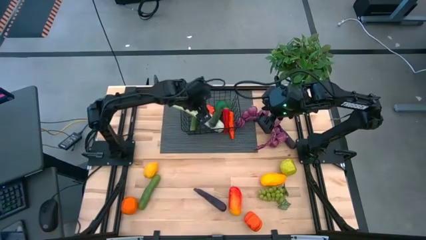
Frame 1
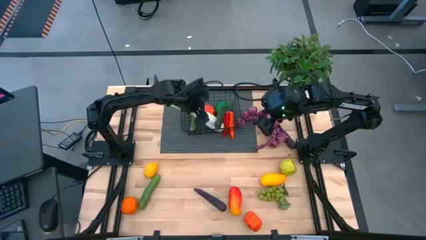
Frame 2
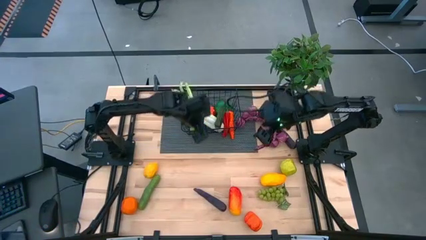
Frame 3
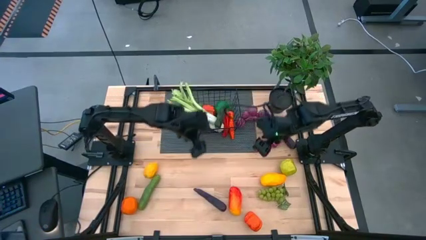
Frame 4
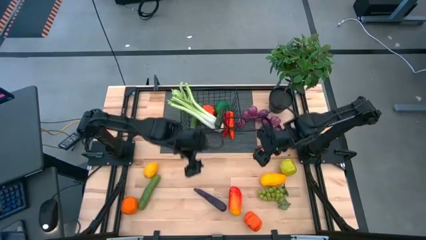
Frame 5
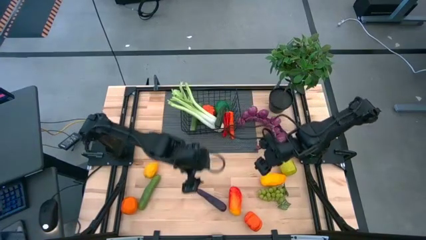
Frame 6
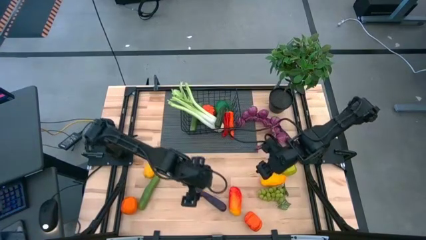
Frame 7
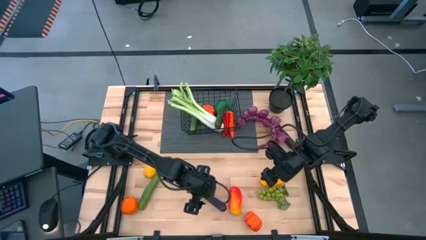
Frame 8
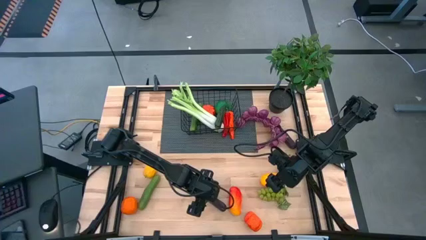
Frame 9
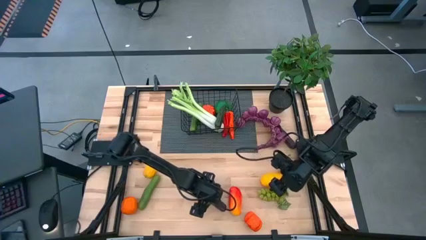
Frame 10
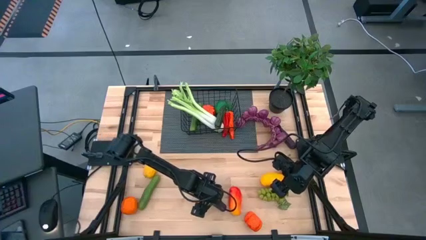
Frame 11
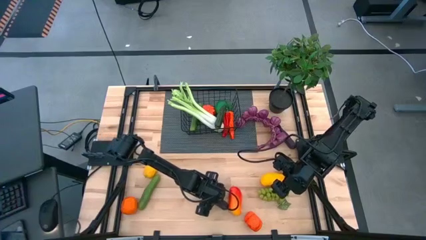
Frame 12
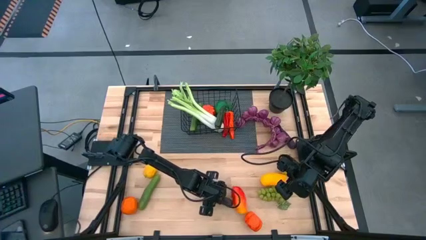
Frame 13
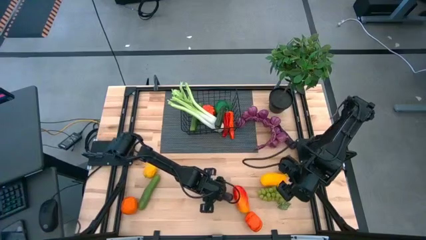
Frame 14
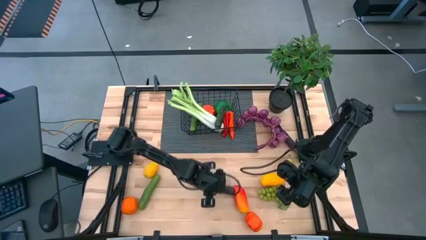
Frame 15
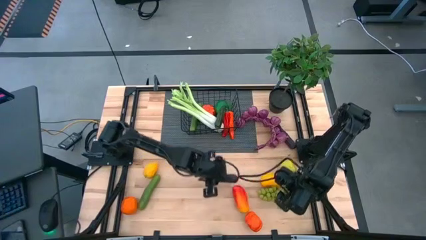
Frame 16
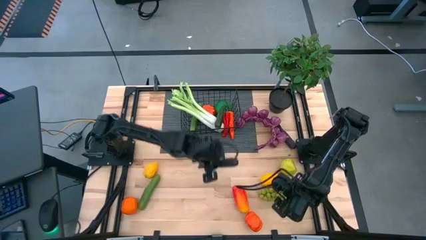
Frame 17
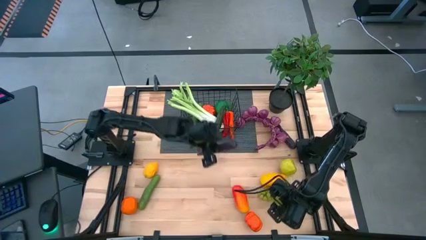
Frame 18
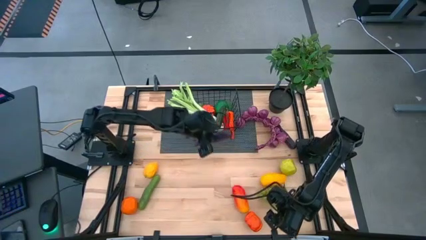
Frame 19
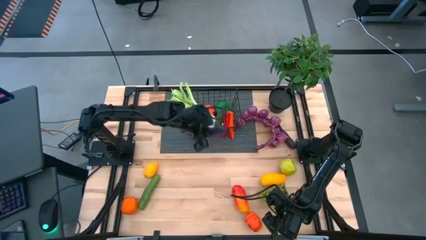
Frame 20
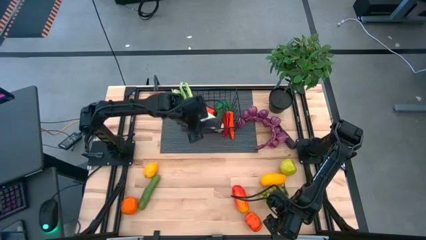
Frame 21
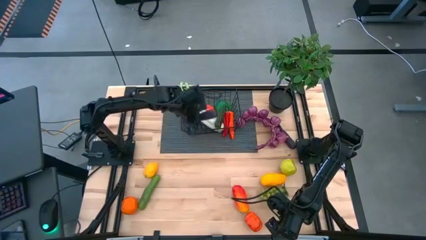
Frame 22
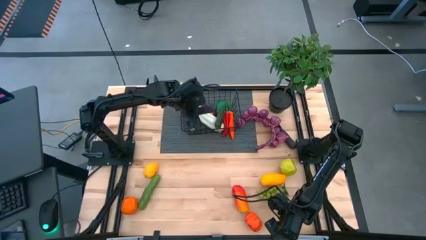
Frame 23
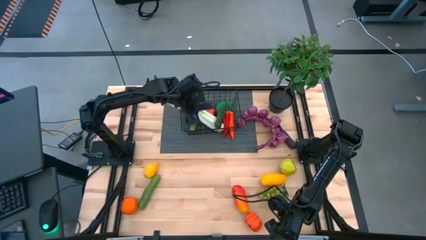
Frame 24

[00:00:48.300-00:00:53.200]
Task: Build produce basket
Put the eggplant into the wire basket

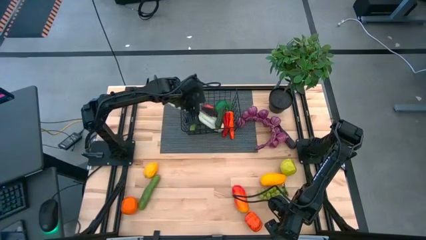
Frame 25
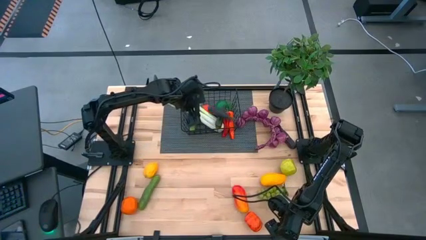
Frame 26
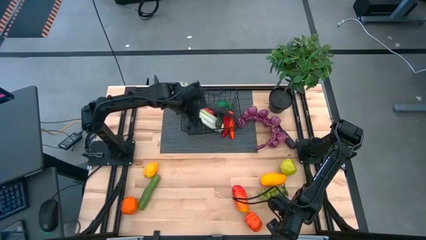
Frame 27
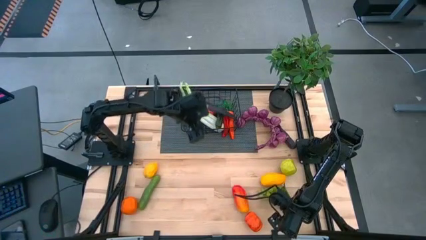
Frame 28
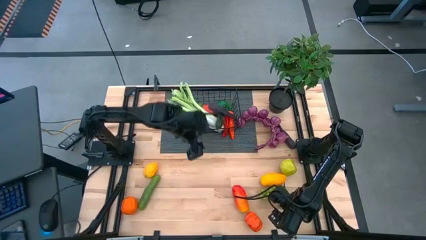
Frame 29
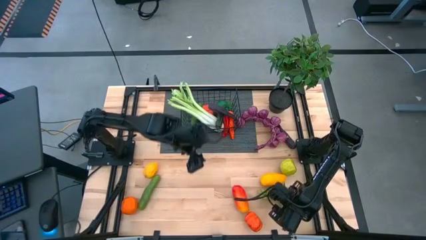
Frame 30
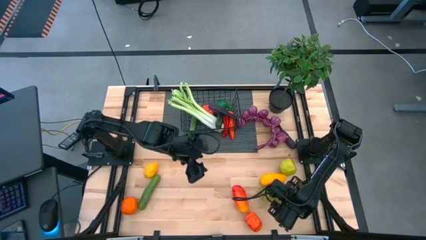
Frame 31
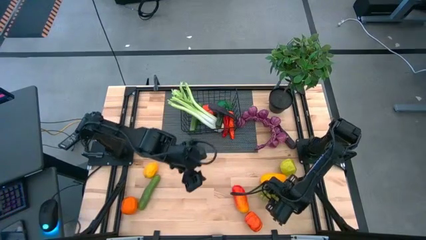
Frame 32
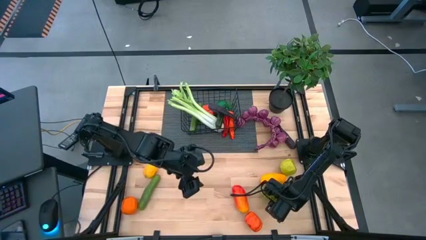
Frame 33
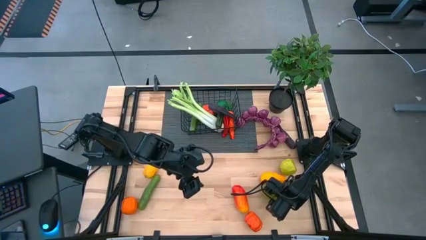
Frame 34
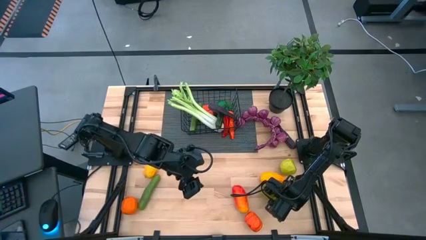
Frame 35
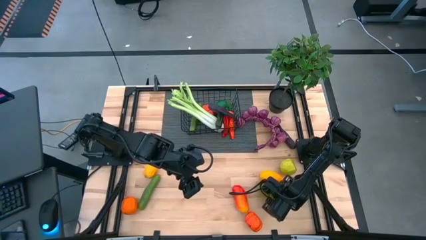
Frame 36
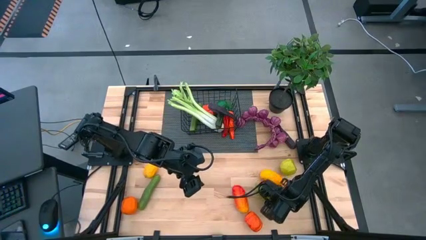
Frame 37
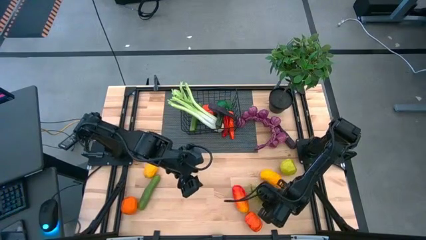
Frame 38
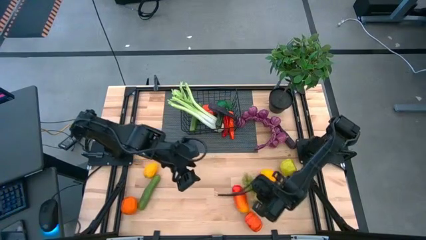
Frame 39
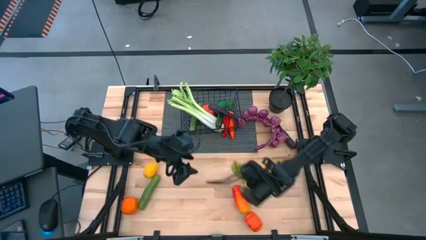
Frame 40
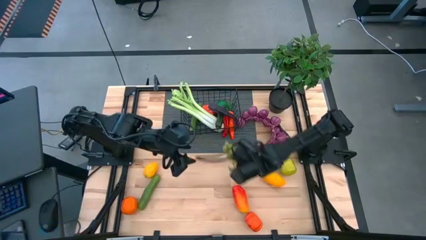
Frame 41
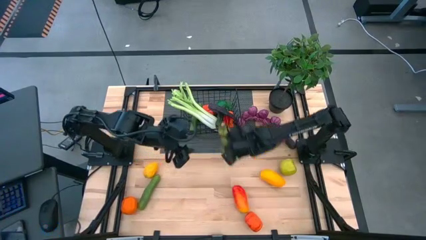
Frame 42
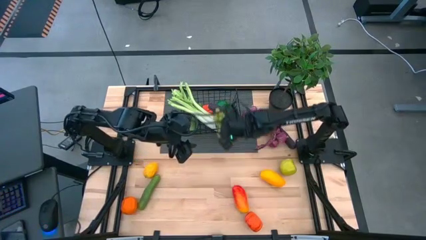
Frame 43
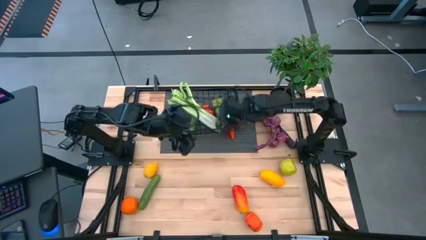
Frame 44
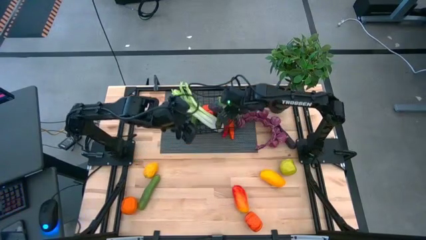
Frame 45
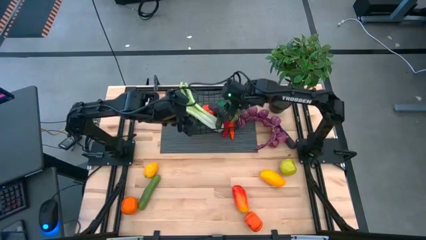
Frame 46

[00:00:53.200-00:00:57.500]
Put the grapes into the wire basket

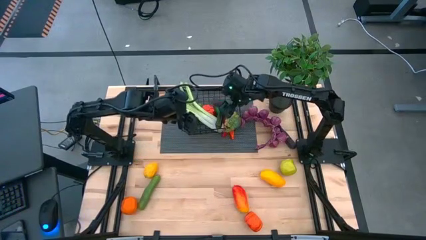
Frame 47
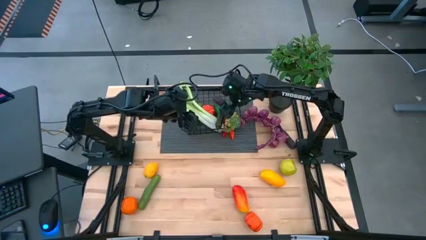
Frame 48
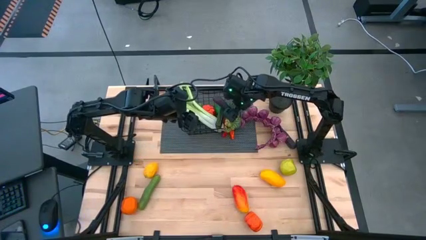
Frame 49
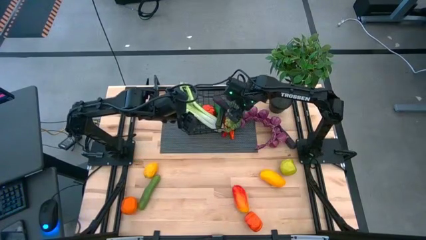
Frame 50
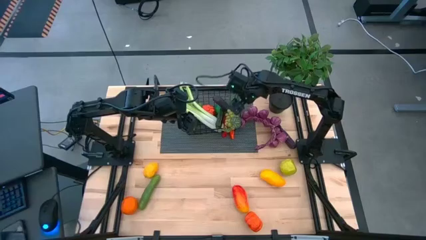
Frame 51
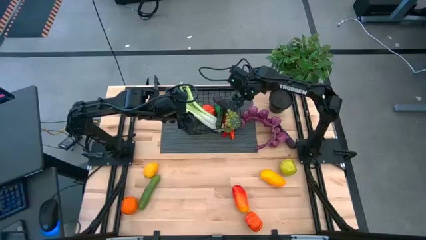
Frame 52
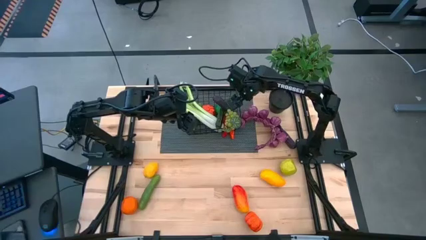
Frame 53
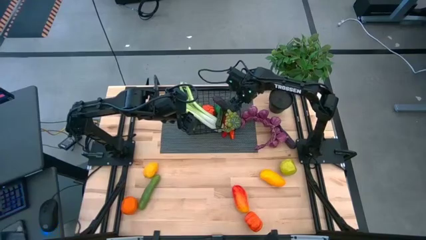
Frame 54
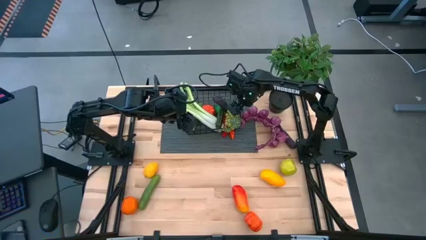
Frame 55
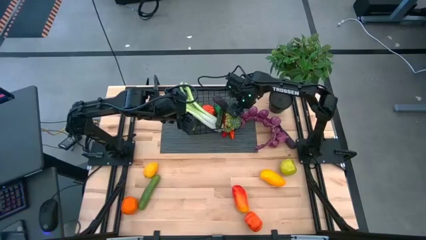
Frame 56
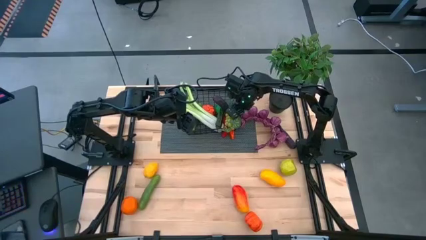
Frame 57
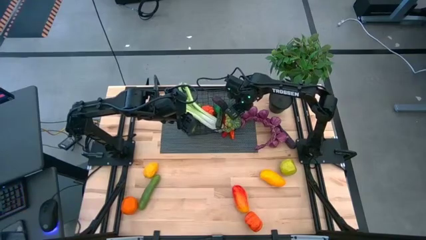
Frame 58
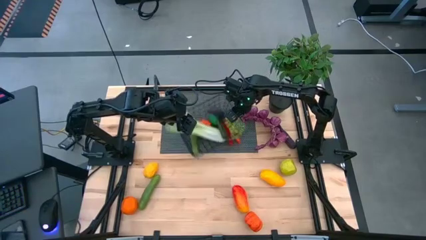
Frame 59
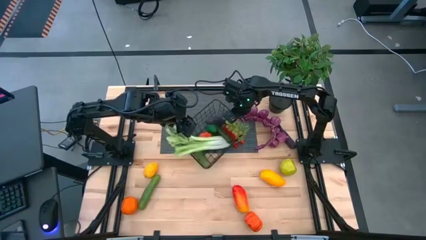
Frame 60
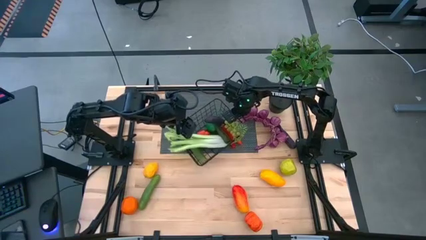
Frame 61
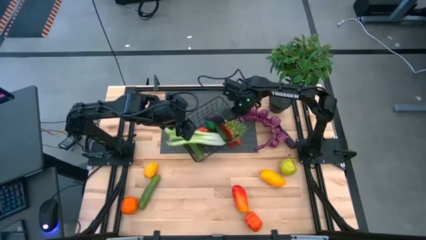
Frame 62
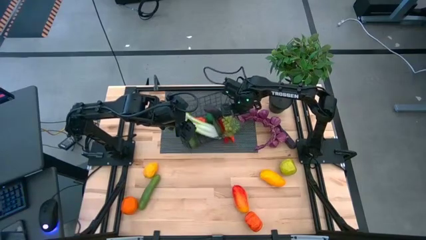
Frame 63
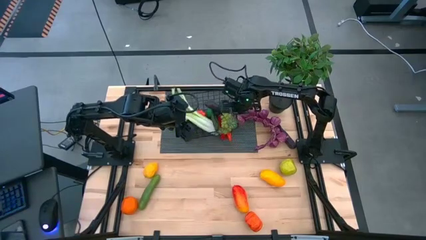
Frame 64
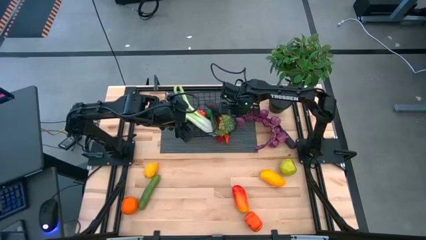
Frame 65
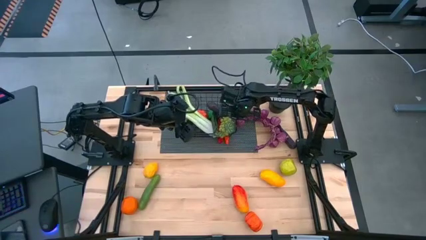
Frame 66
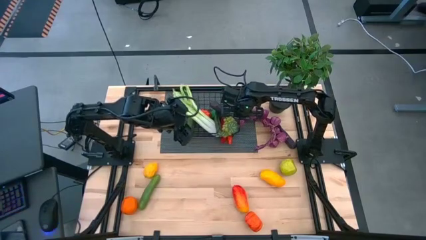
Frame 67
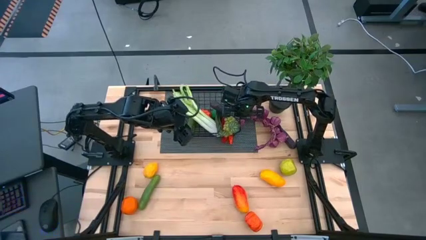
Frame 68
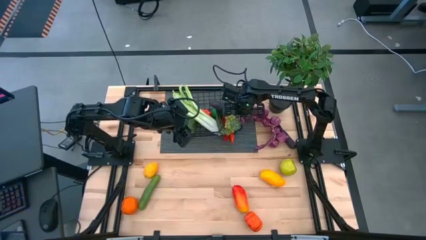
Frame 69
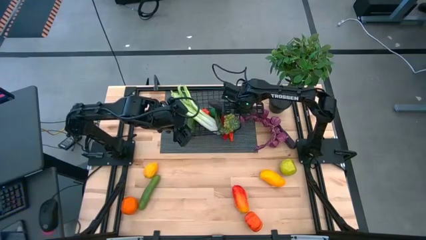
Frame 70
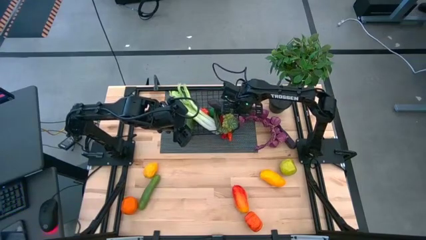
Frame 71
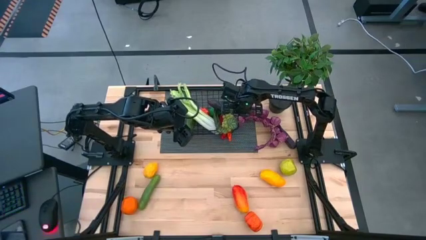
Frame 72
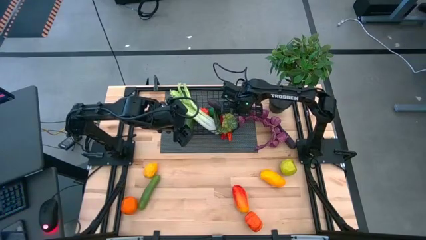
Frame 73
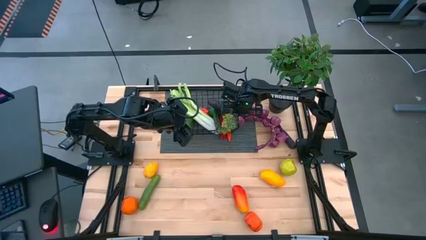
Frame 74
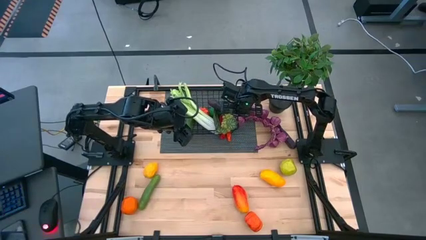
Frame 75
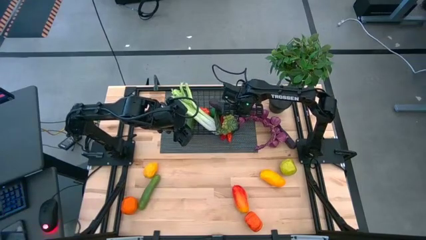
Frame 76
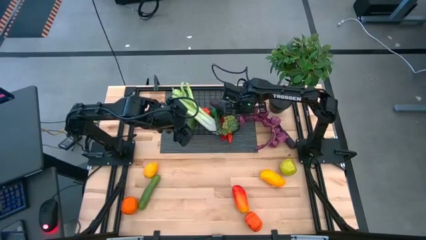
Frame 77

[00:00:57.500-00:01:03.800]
Adjust the wire basket

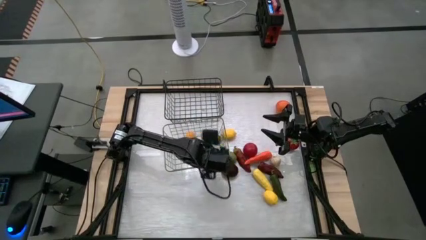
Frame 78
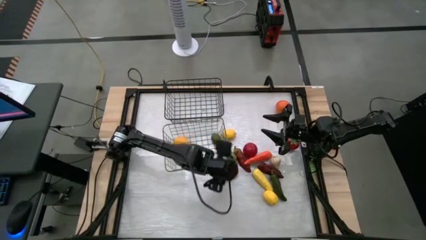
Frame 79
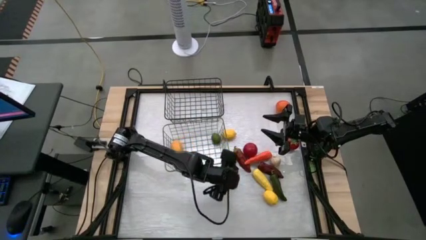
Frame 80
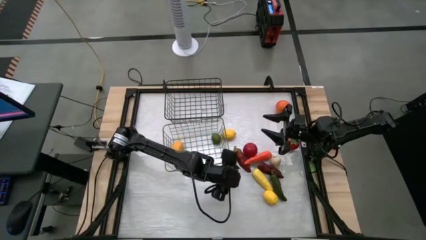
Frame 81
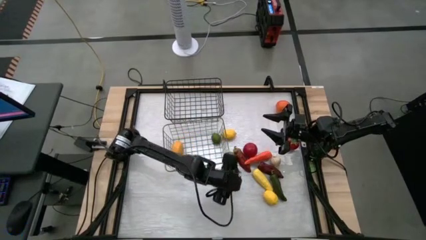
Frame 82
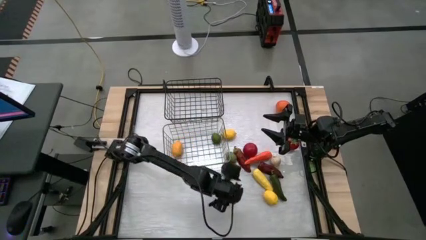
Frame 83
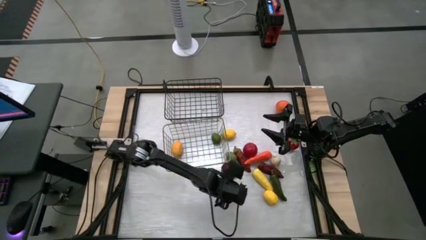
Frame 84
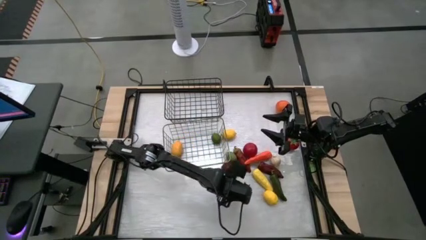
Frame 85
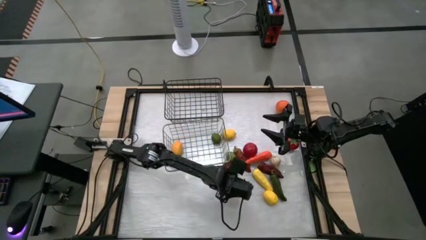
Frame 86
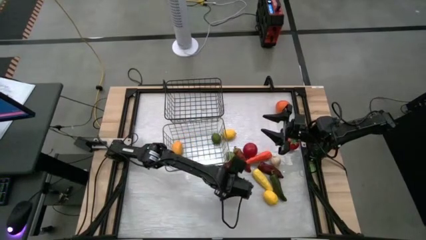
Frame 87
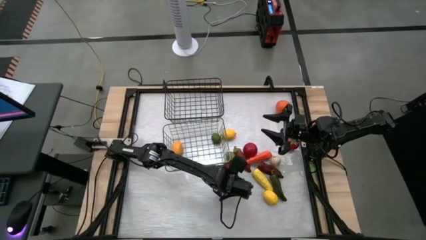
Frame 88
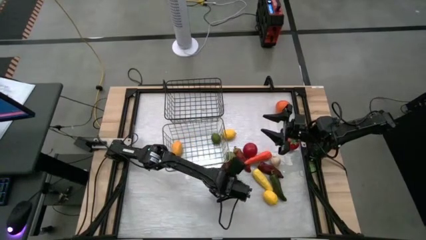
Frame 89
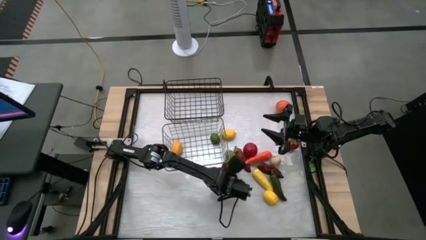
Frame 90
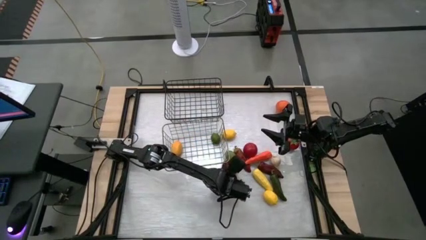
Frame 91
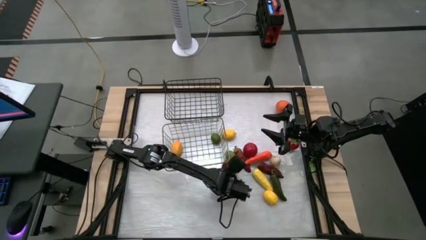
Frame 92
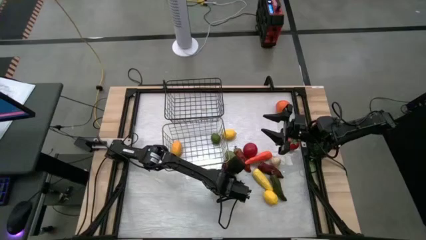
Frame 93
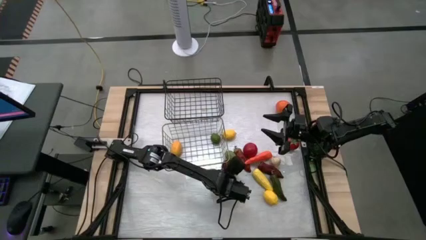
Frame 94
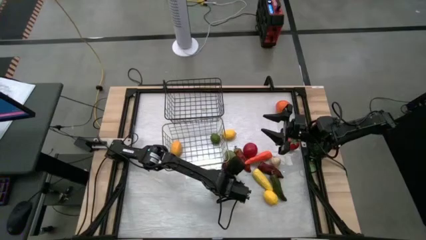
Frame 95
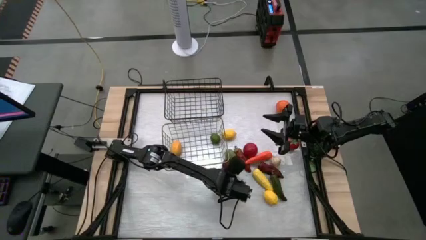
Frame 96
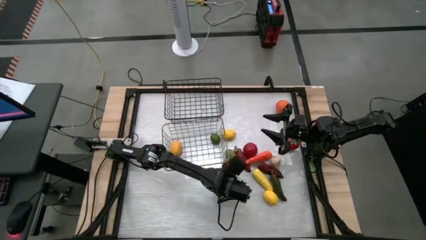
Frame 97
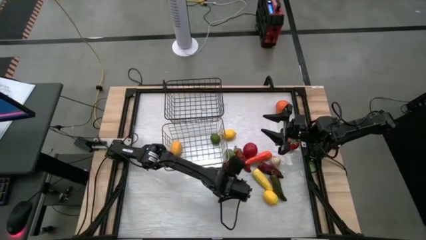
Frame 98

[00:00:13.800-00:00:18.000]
Task: Sort produce into baskets
Put the red apple into the brown wire basket
